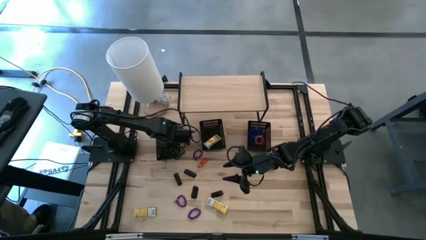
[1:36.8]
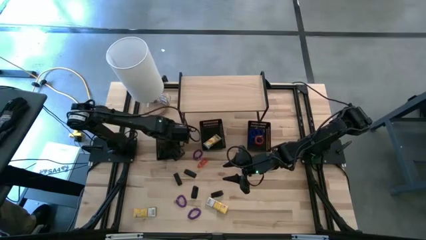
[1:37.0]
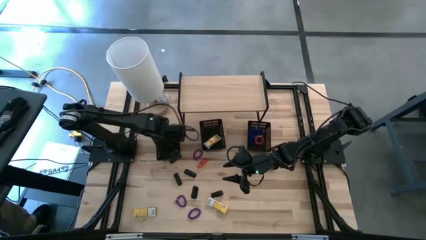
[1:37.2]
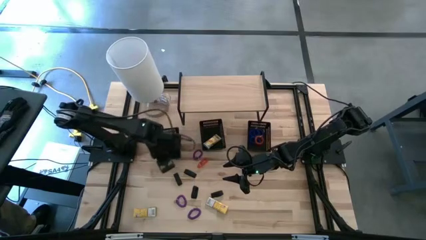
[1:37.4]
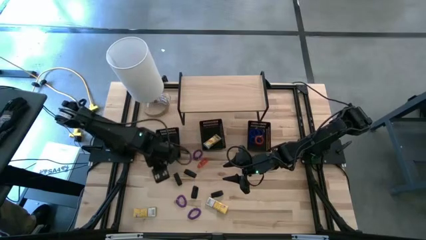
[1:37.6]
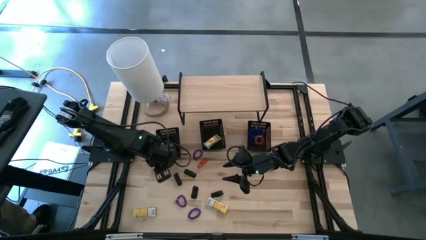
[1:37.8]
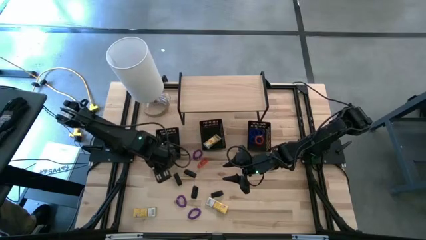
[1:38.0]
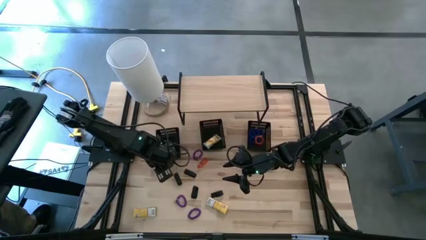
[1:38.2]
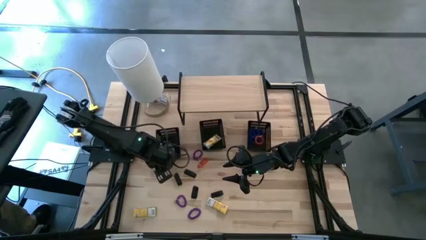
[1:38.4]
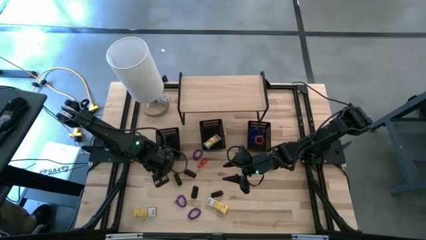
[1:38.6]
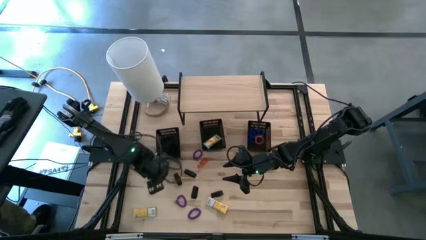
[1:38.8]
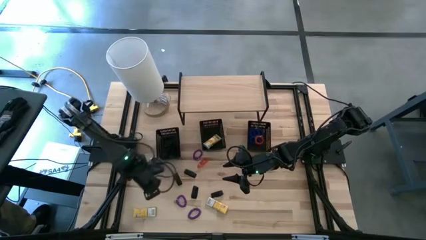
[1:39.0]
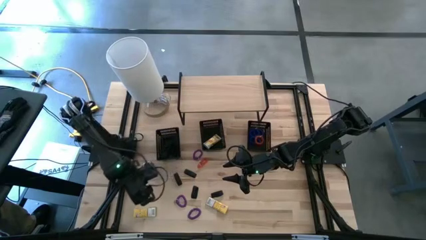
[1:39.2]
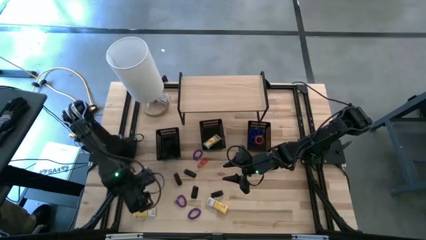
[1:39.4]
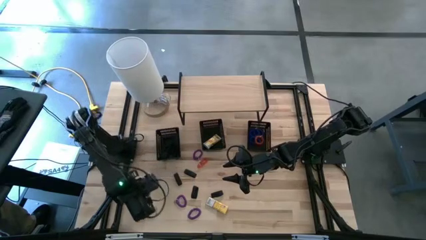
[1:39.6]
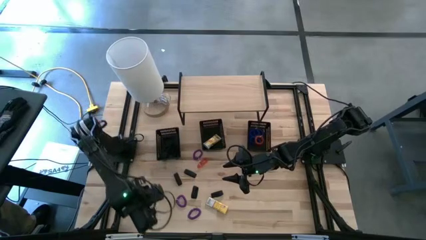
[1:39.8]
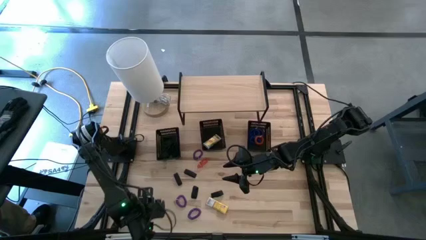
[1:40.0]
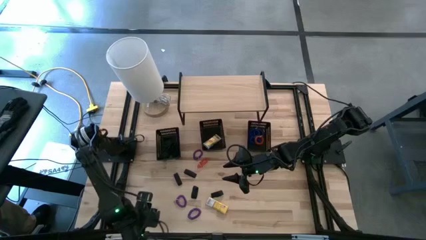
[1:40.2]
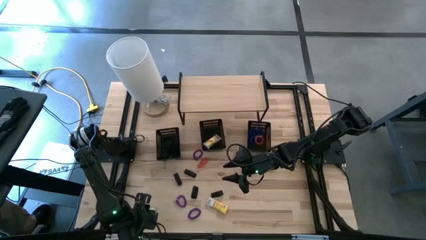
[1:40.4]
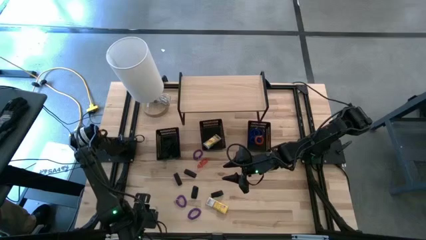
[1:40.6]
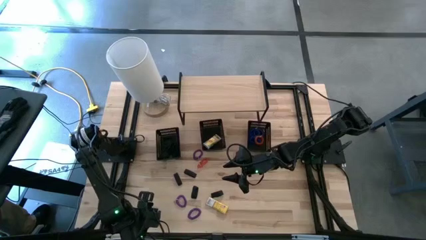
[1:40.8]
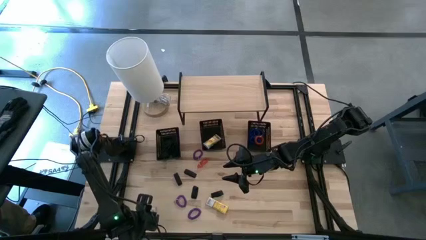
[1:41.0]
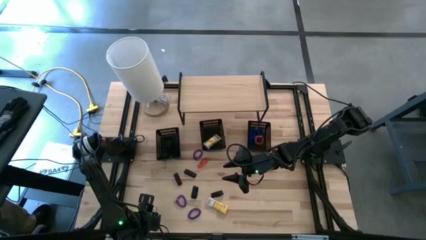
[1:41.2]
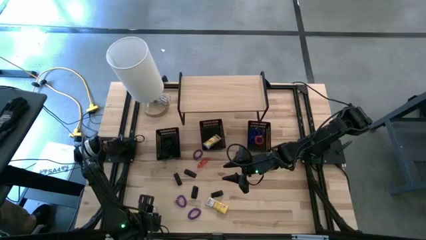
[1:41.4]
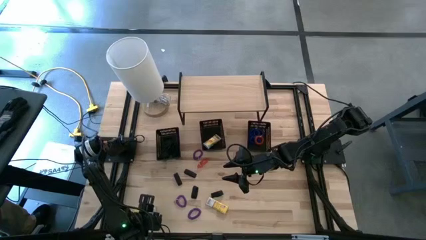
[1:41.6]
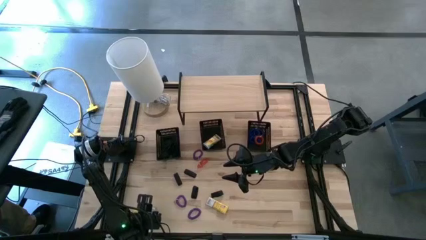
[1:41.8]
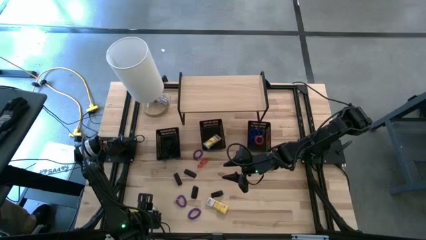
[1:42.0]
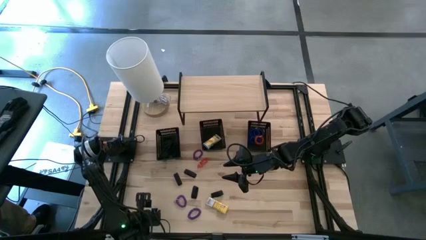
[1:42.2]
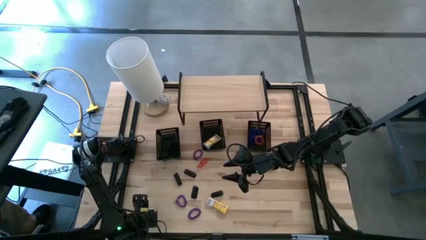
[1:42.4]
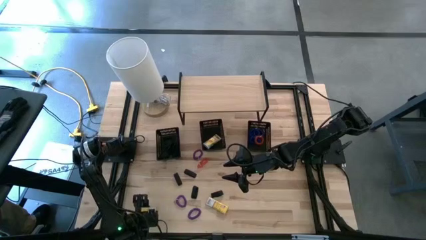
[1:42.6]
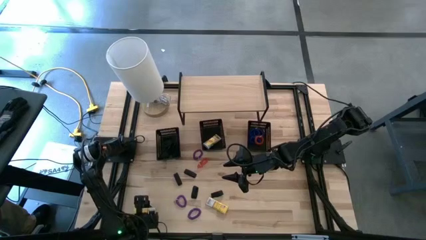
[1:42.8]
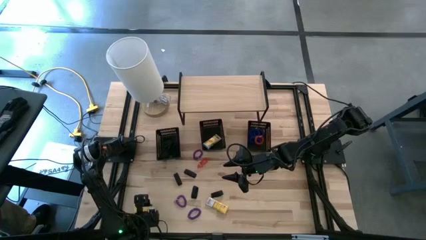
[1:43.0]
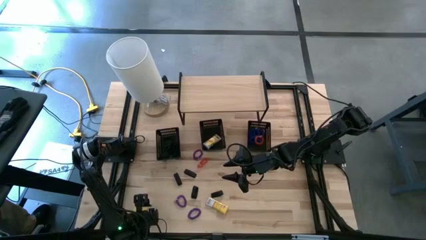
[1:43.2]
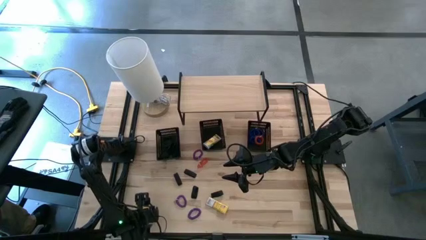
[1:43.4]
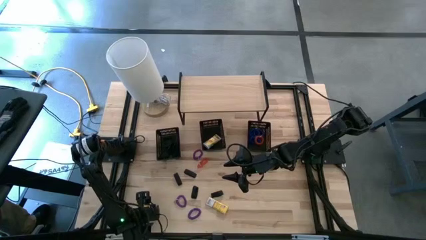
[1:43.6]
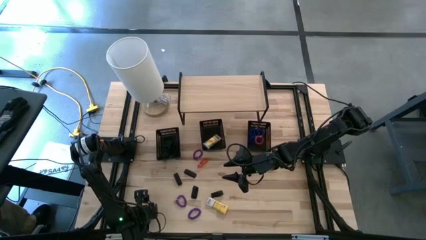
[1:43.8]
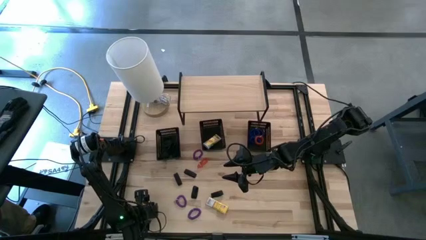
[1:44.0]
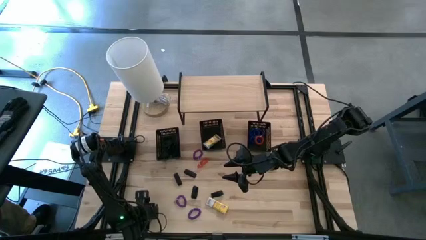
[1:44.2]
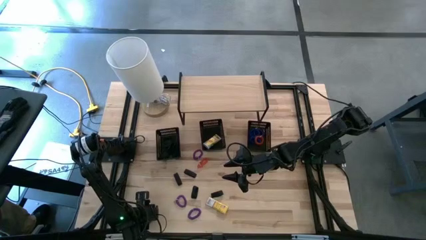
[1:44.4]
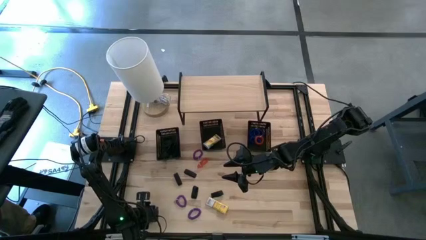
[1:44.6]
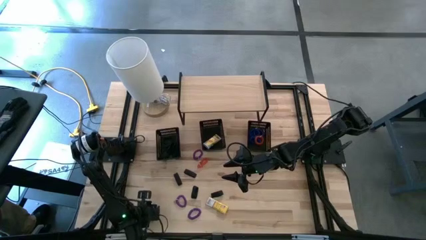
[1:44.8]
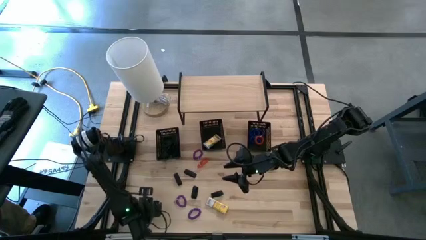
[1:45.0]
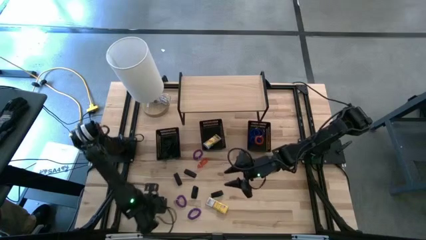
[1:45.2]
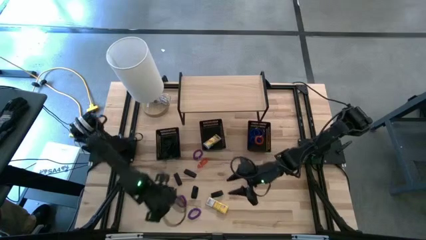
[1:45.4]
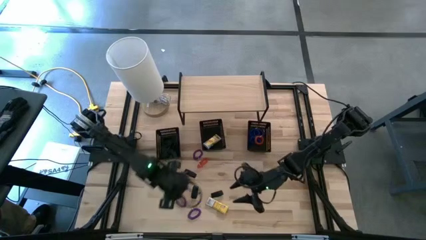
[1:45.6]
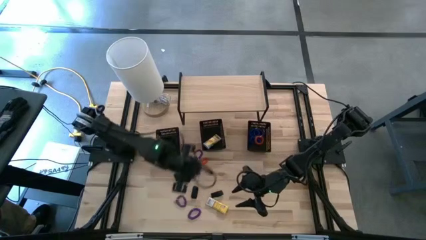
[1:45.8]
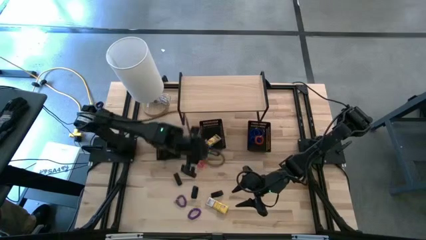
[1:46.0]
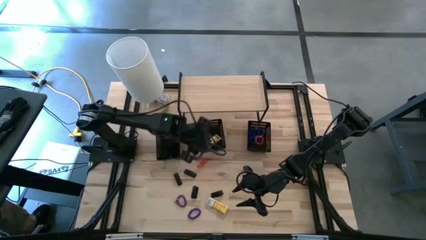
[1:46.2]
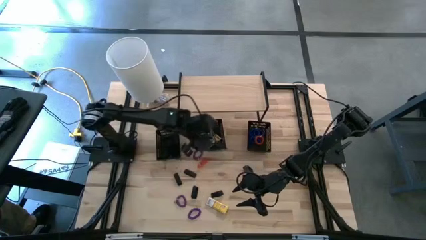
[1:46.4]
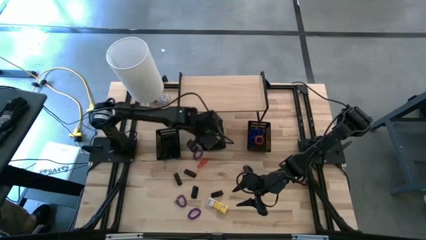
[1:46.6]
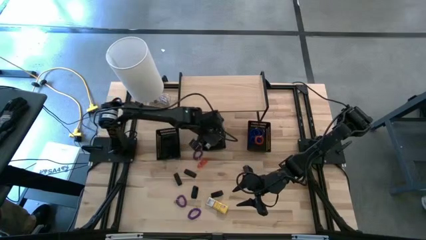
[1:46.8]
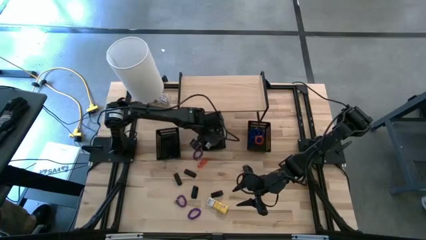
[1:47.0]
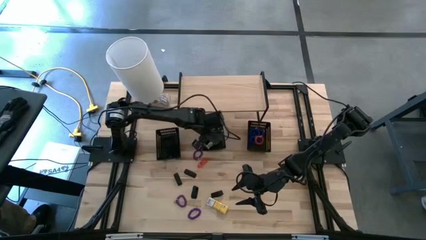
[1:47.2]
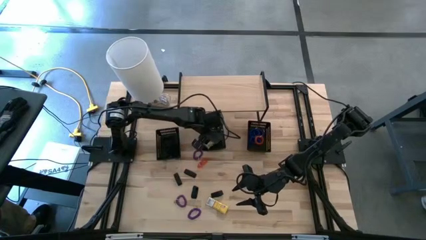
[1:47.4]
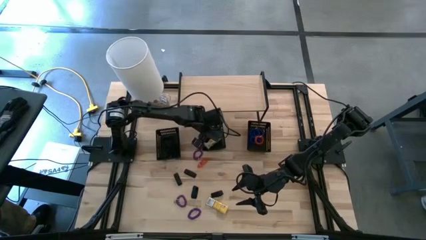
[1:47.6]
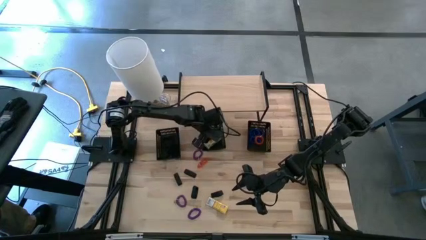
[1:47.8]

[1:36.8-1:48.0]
Task: Pick & Place Office Desk Supplies
Put the yellow crayon box into the center black bin

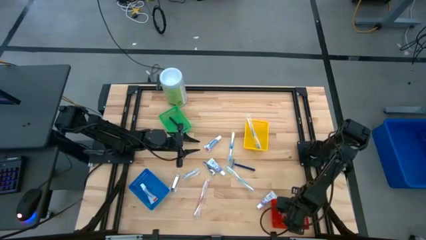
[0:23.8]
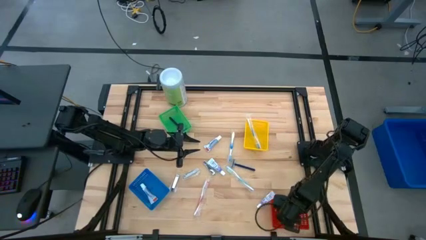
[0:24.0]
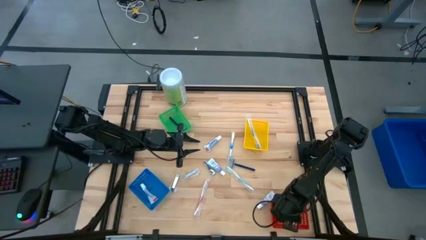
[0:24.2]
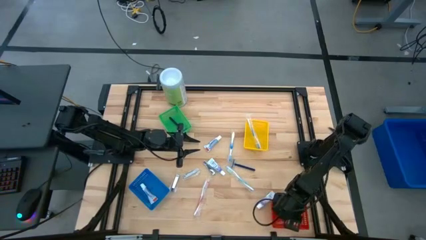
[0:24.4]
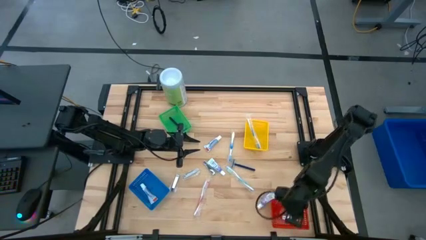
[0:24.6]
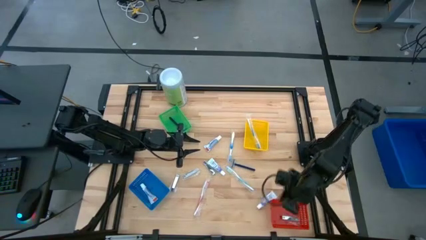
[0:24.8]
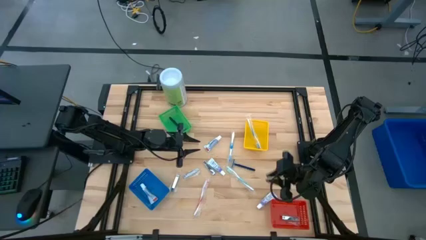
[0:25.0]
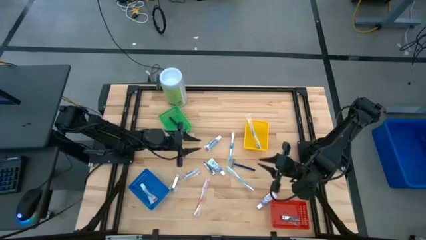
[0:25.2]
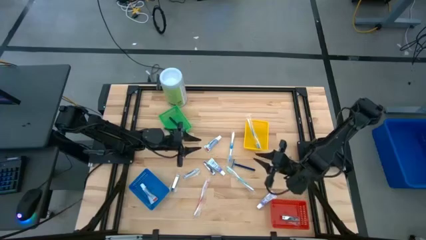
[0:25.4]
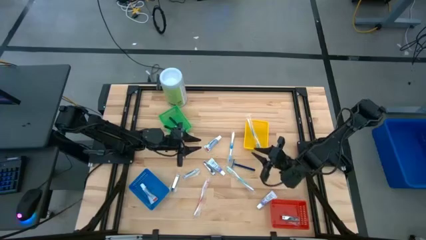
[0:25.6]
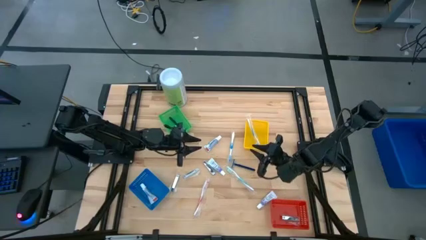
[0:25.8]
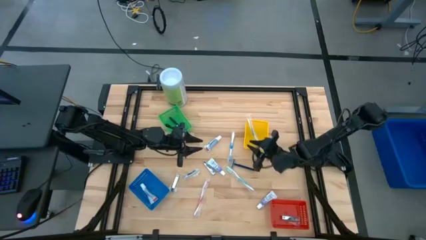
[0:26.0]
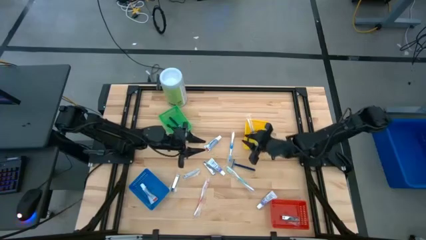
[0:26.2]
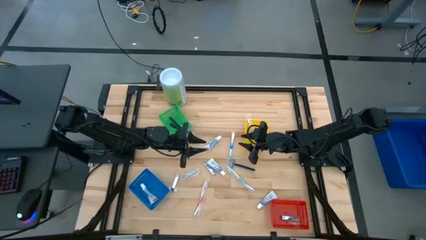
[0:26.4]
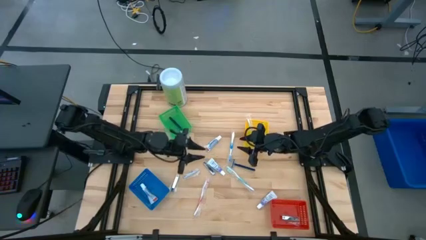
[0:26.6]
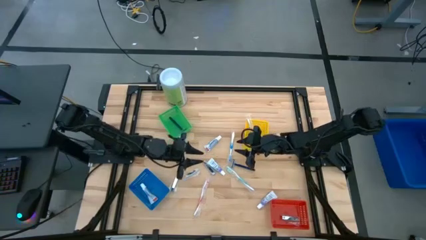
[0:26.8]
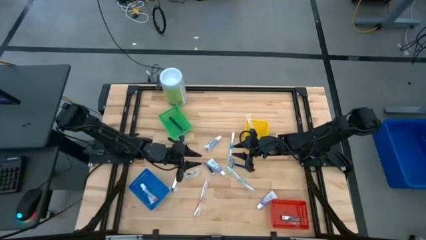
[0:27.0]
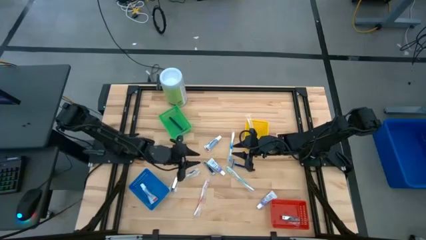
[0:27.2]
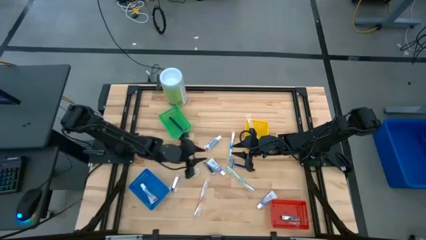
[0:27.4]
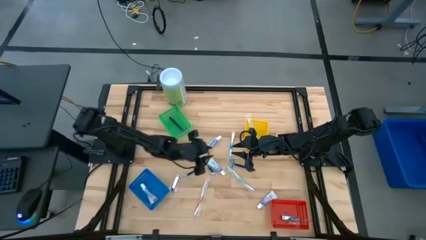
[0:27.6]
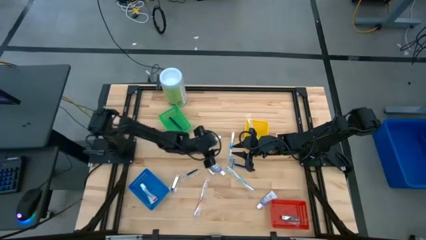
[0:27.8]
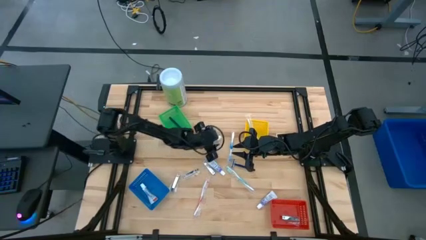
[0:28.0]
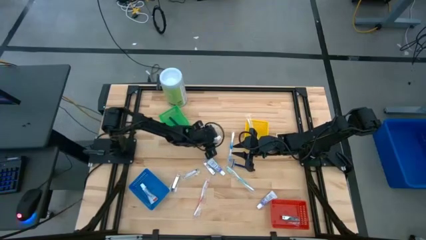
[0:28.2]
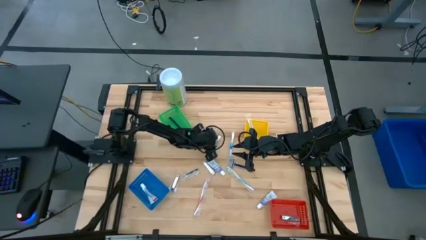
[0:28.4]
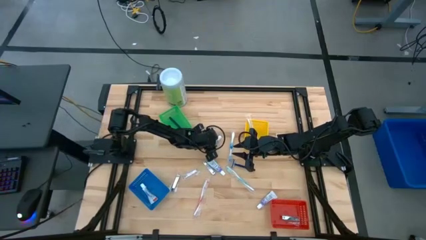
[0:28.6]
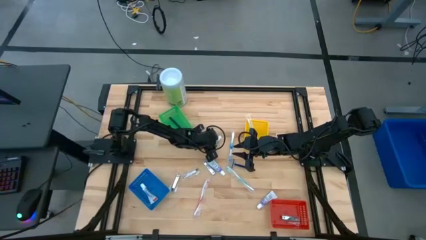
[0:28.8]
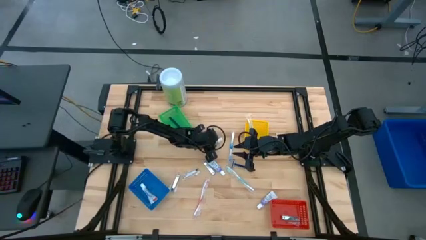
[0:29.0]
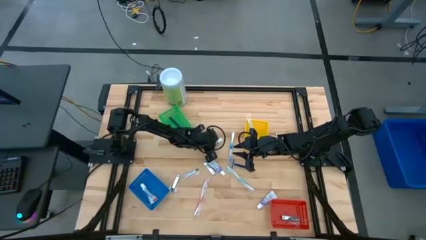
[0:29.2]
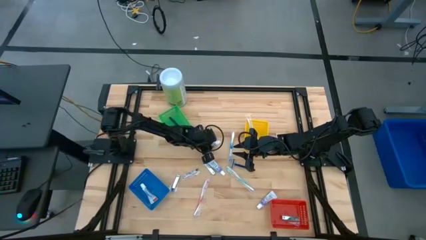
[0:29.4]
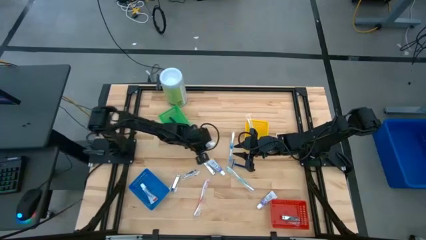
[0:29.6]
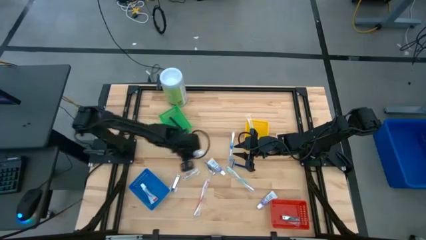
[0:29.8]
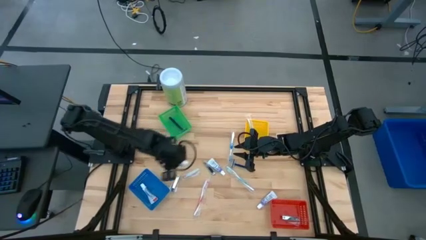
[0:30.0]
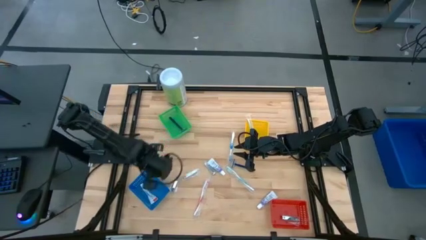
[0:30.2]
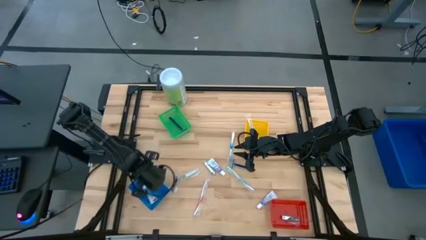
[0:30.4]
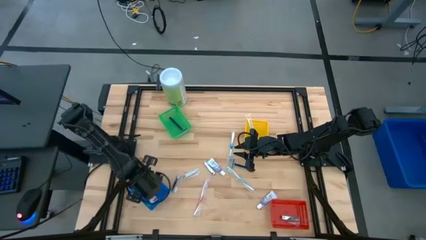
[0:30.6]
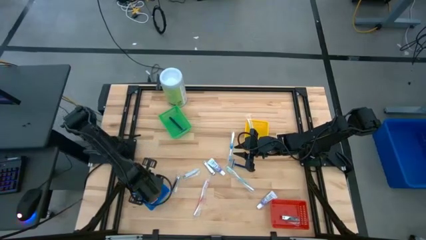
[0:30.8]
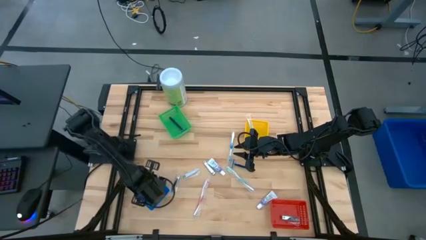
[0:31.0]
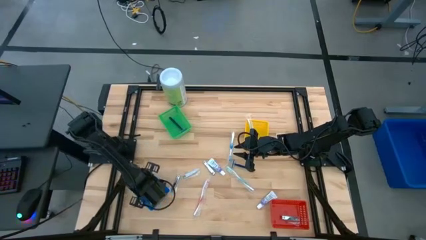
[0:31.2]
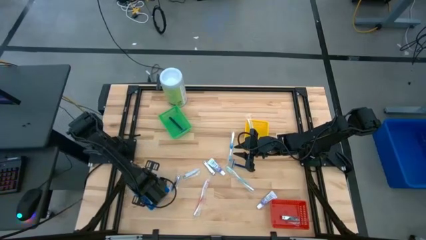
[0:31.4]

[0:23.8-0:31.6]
Task: Pick & Place Travel size toiletries
Put the top toothpaste into the blue bin
